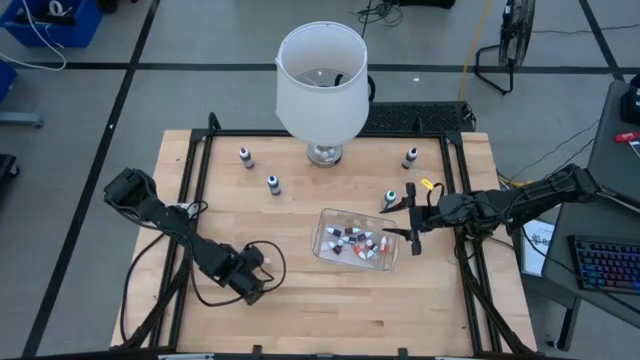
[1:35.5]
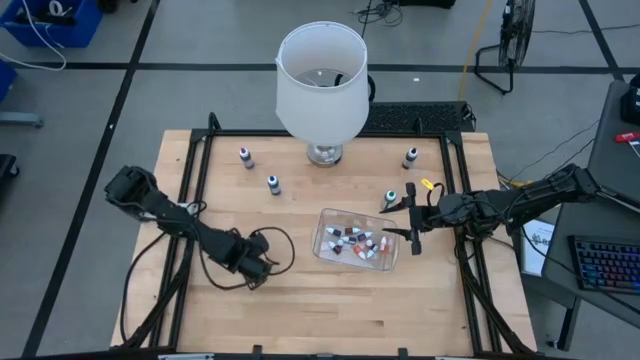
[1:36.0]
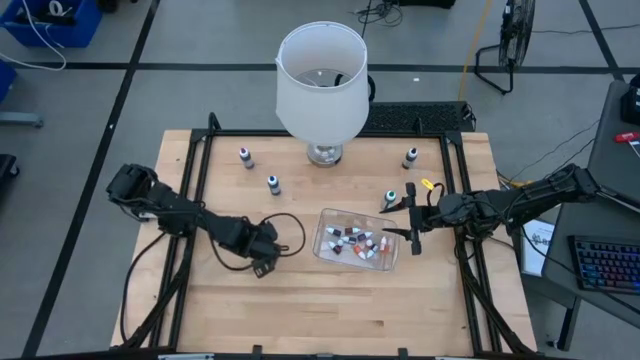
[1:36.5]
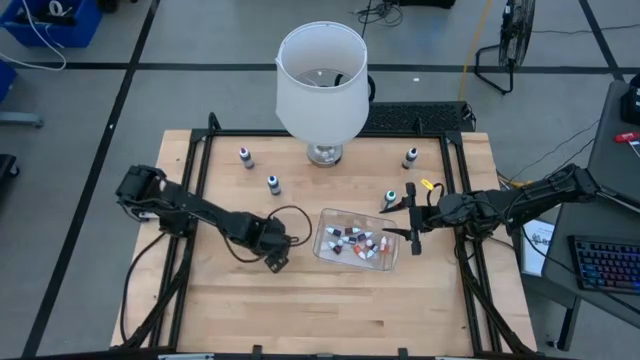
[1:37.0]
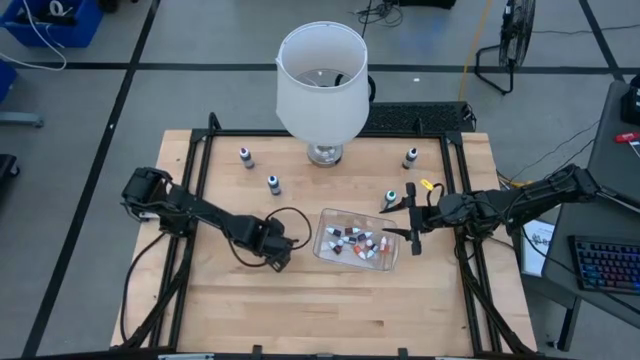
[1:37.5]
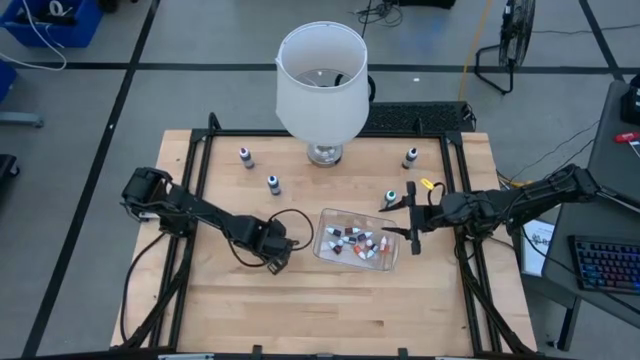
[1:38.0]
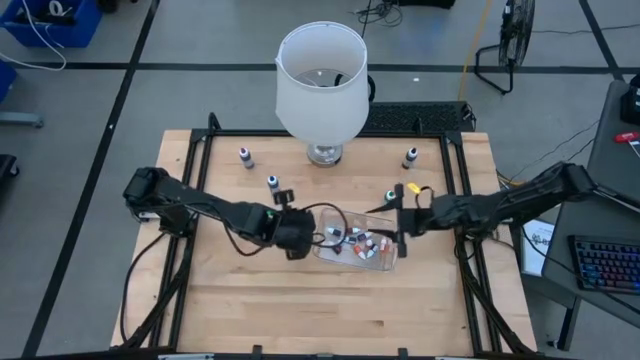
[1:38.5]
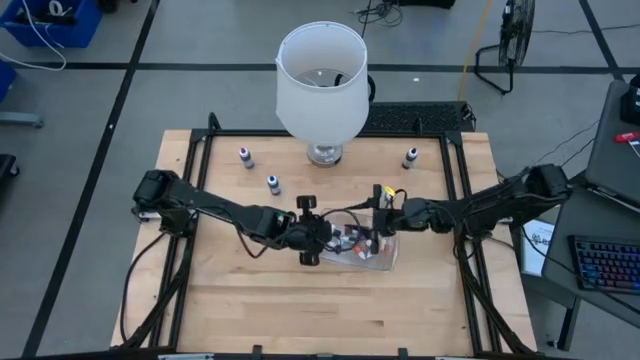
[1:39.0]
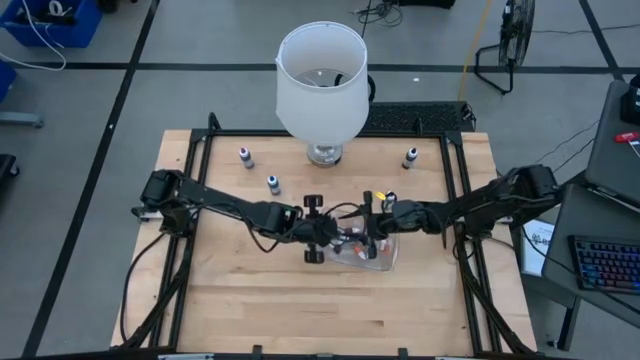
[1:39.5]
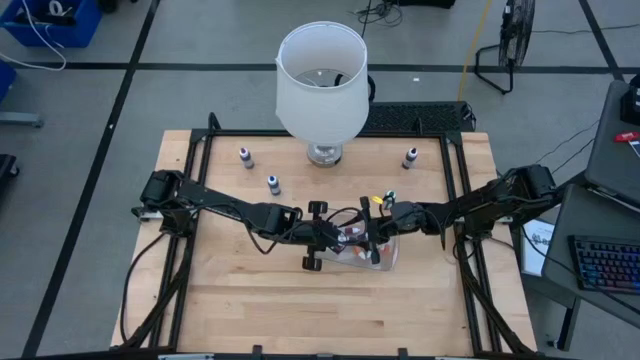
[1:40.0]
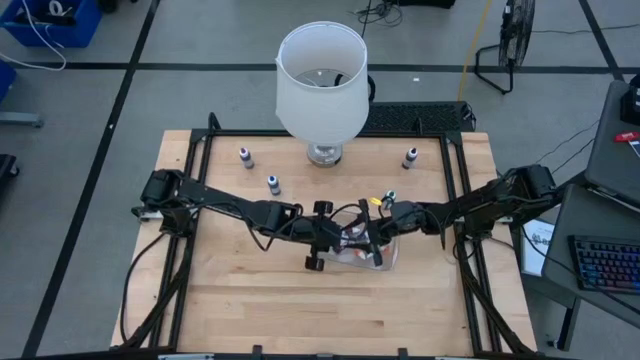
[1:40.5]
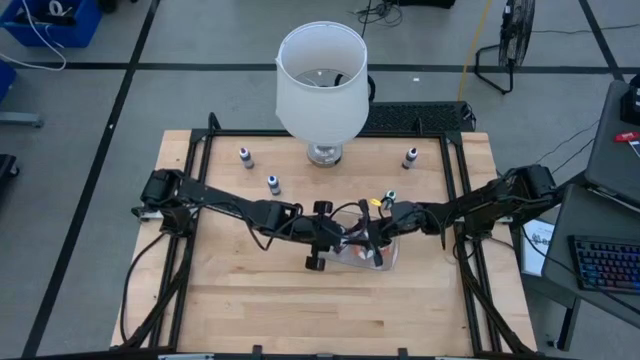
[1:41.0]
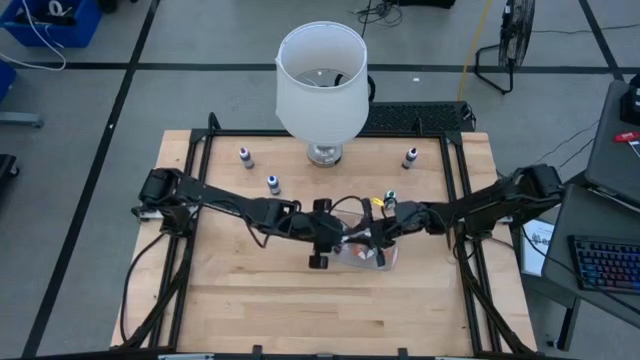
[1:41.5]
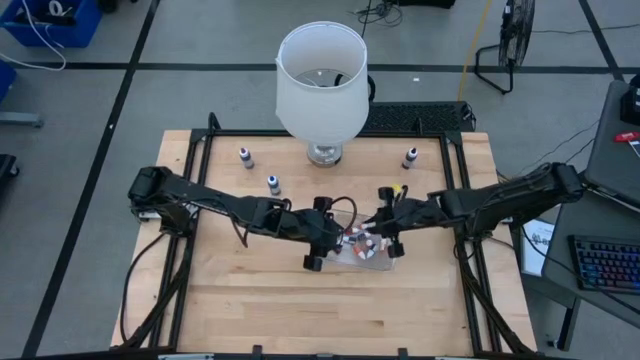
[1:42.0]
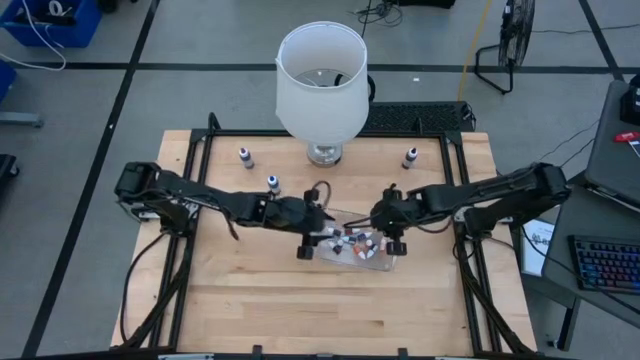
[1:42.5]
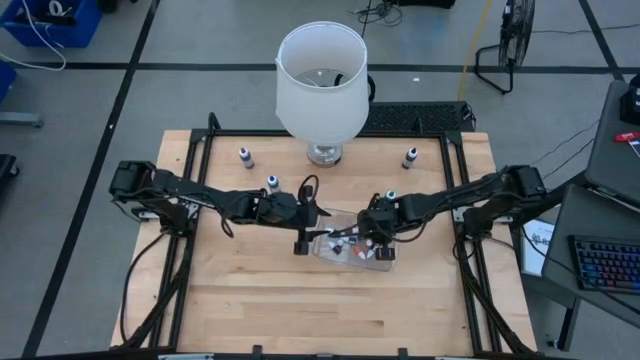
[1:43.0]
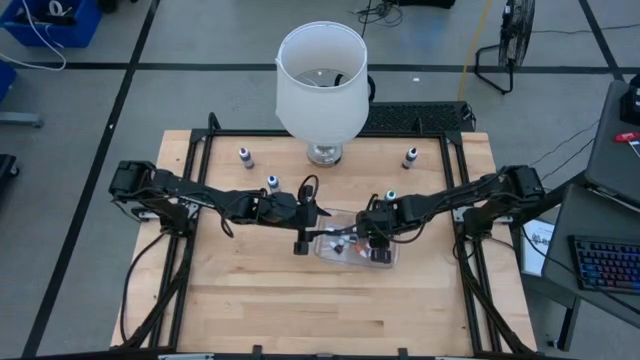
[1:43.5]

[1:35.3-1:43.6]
Task: Pick & Place food coloring
Put the yellow food coloring bottle into the transparent bin

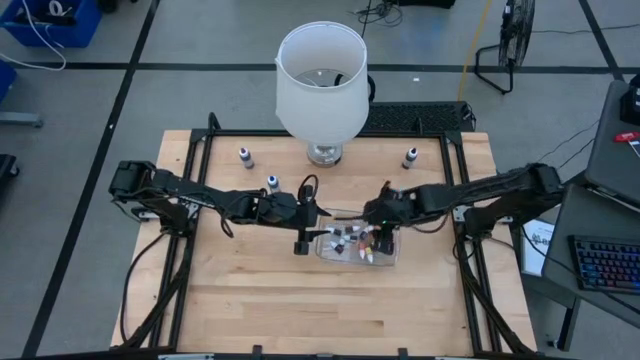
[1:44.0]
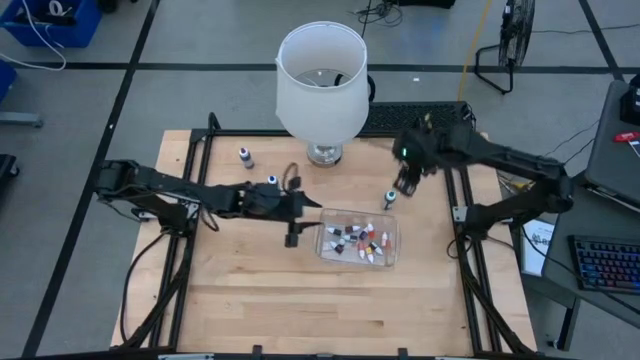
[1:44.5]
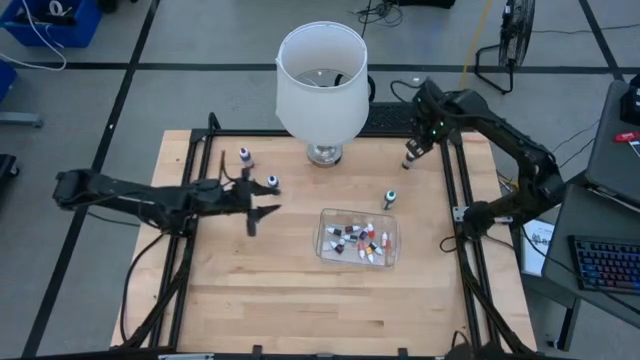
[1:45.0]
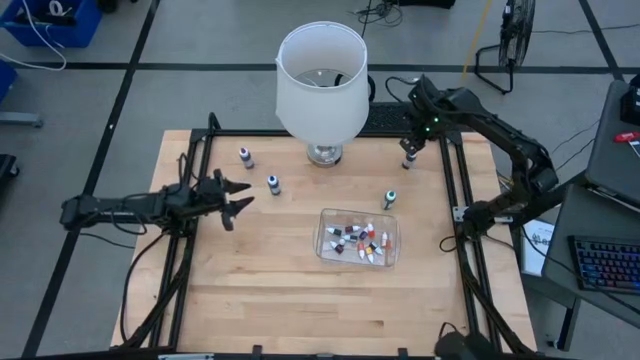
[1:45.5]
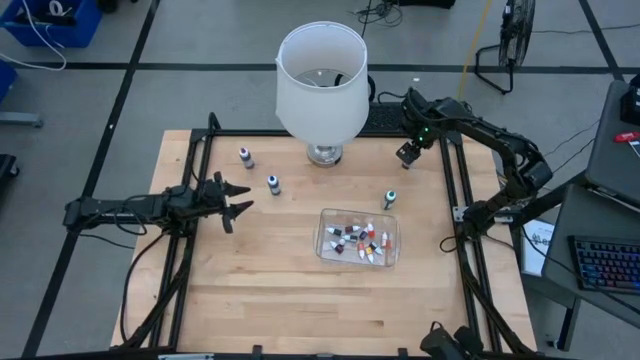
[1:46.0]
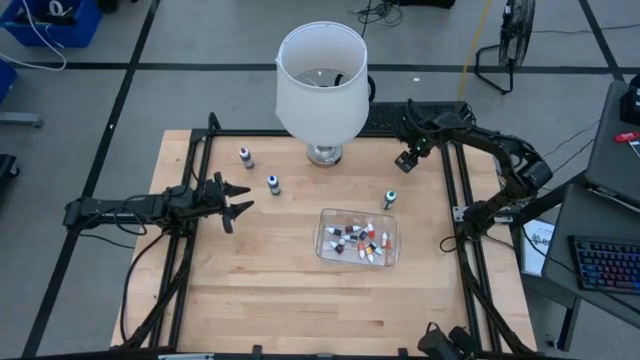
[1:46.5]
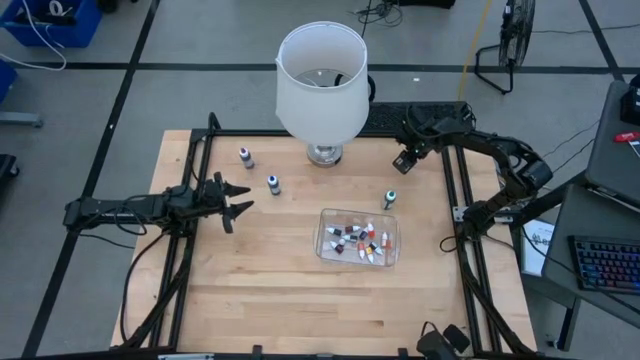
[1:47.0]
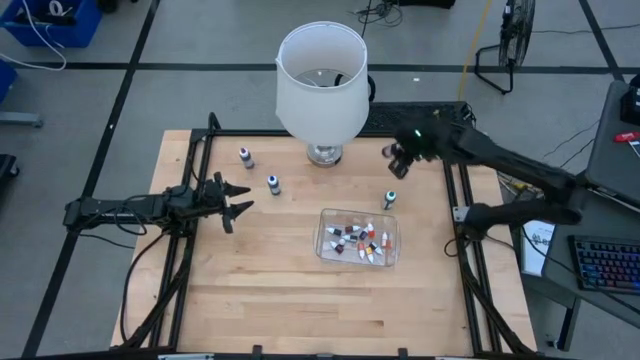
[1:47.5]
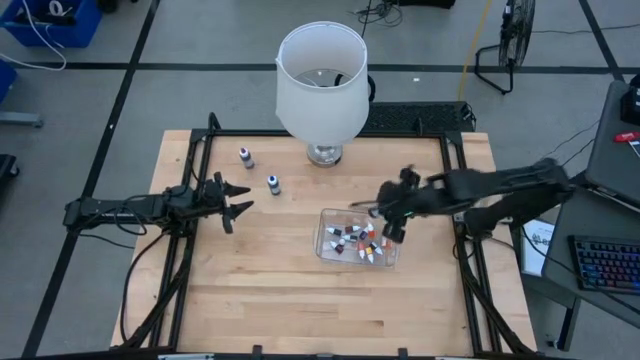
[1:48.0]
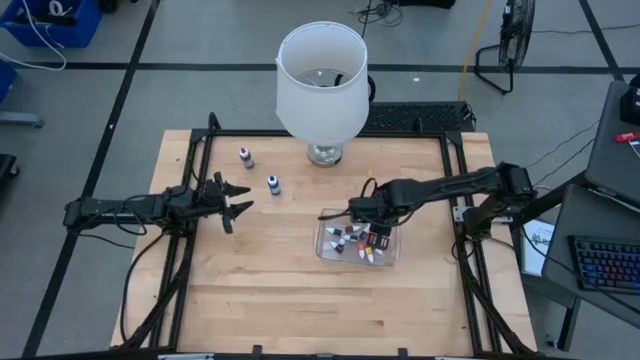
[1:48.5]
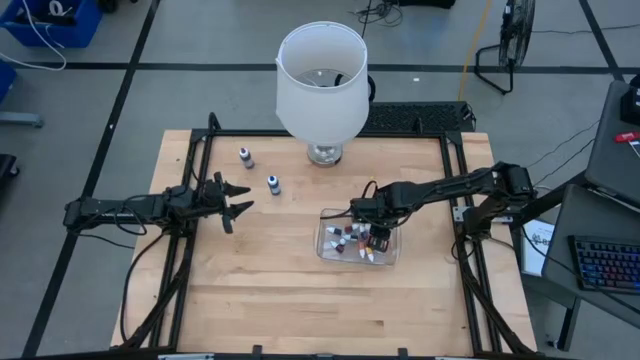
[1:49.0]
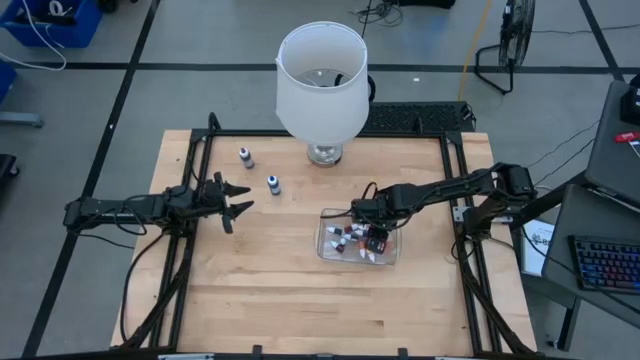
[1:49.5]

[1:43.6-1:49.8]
Put the large black food coloring bottle into the transparent bin

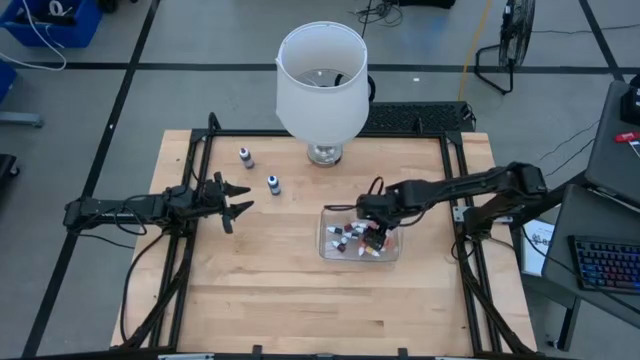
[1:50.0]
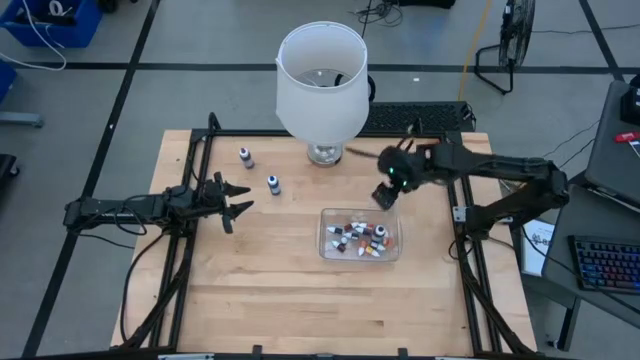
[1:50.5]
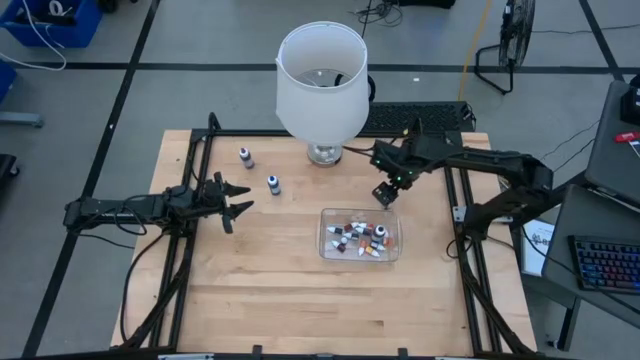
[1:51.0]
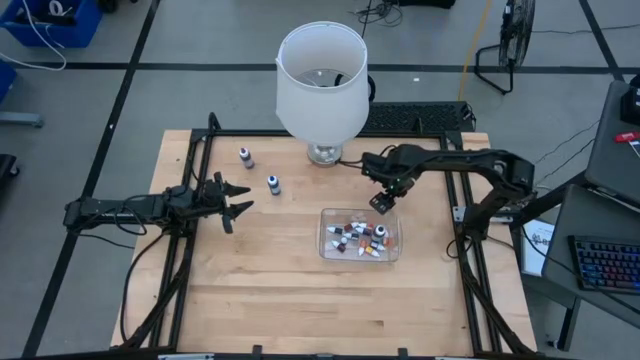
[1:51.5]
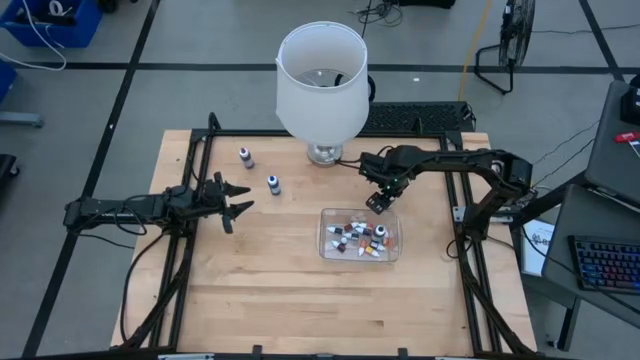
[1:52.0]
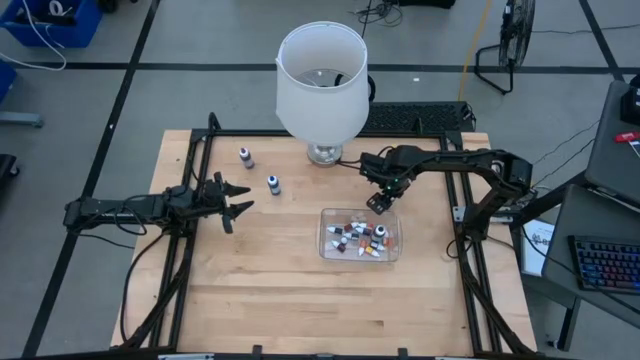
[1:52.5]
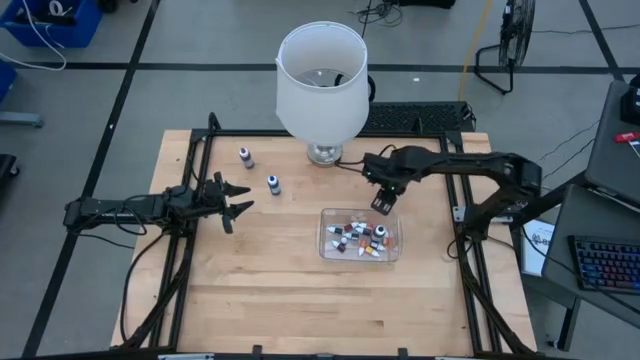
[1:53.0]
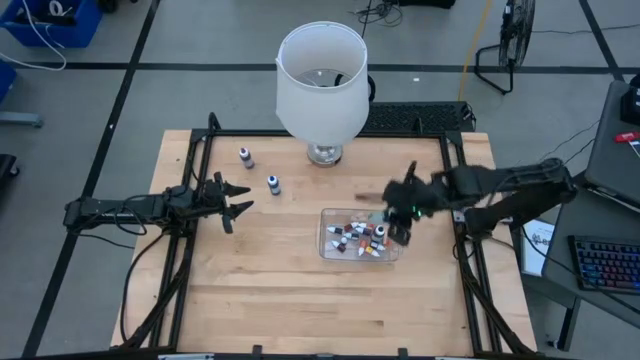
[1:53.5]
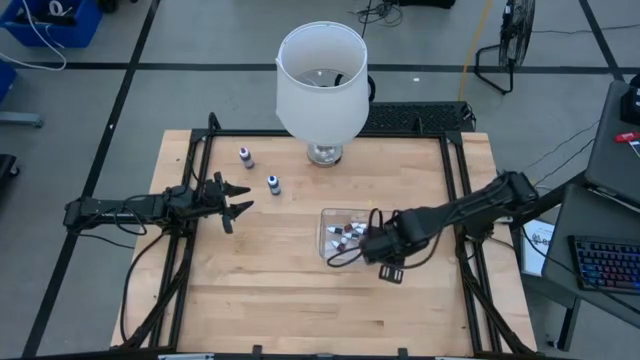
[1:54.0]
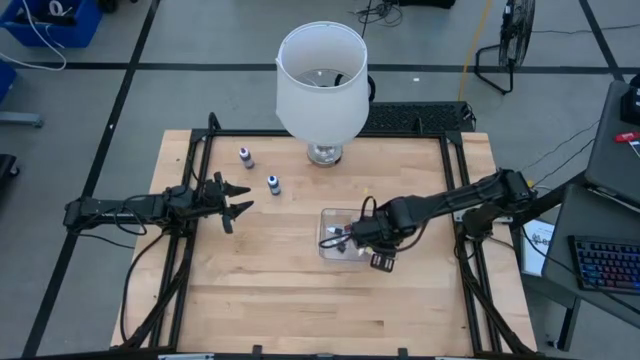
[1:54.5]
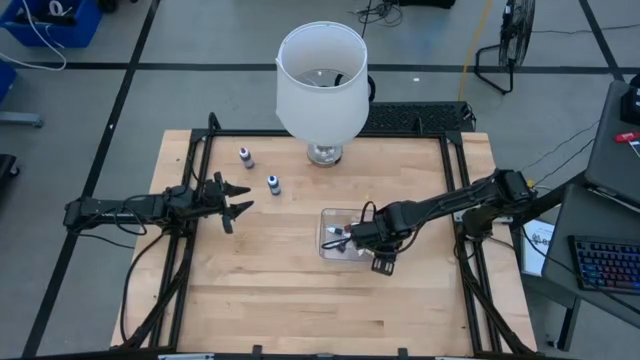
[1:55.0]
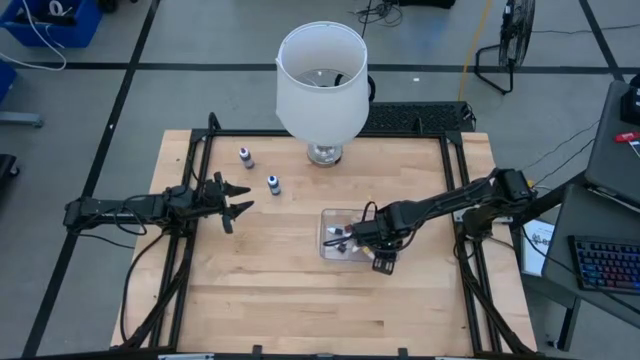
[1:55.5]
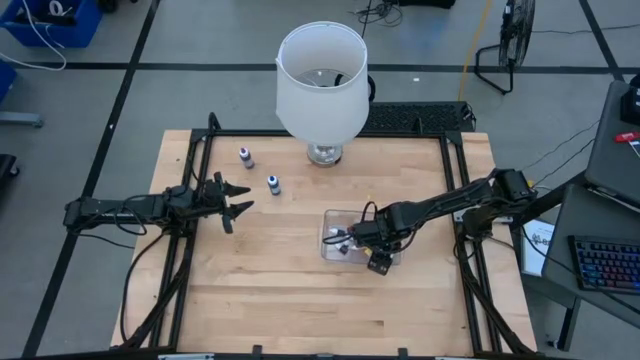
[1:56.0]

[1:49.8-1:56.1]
Put the large green food coloring bottle into the transparent bin

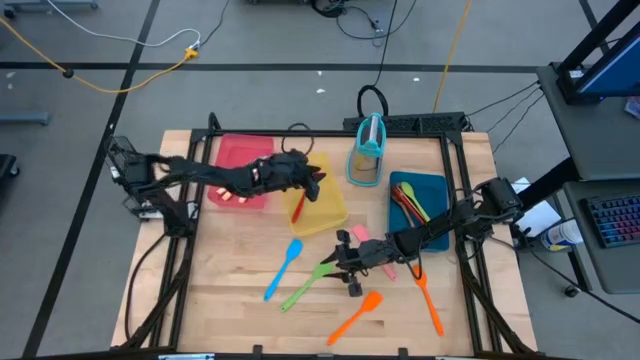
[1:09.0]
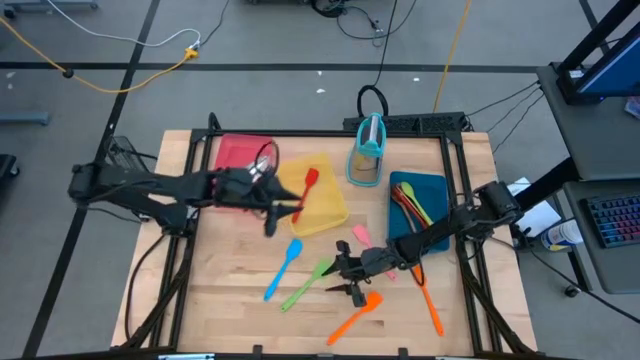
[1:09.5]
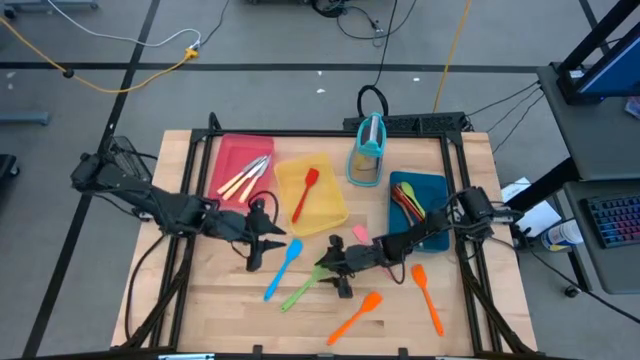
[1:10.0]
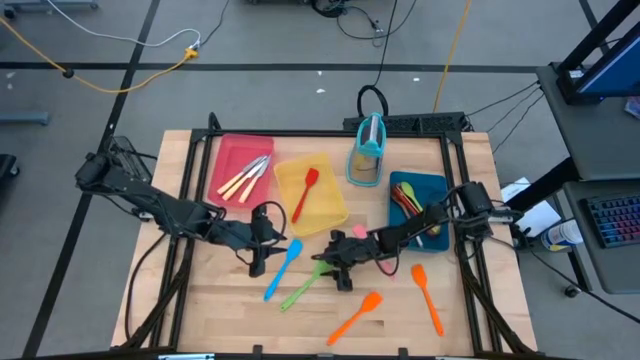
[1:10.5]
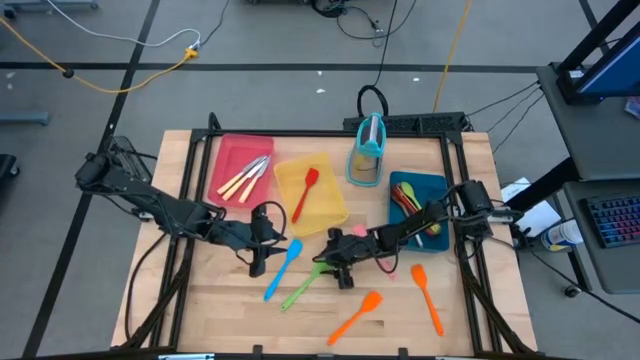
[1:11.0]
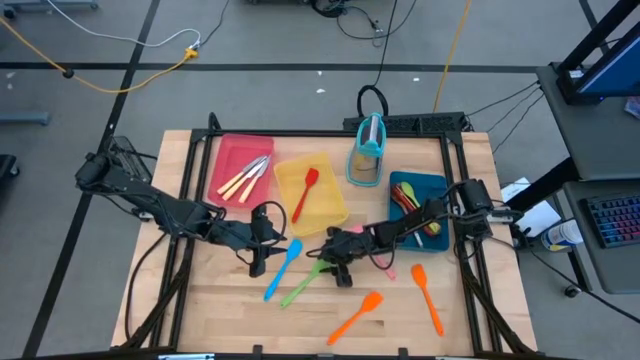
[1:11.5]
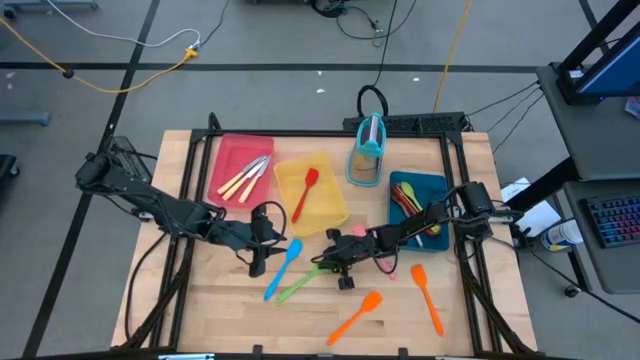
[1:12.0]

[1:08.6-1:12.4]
Task: Pick & Place Kitchen Items
Put the green spatula into the yellow bin
